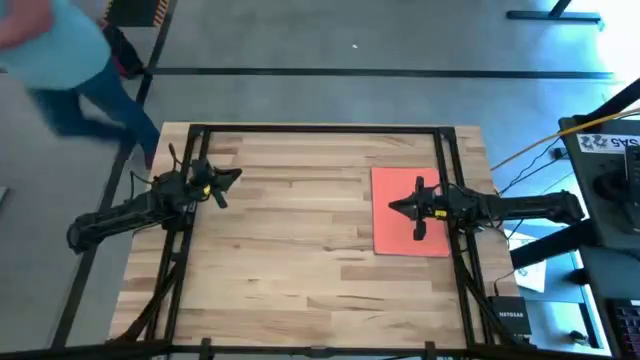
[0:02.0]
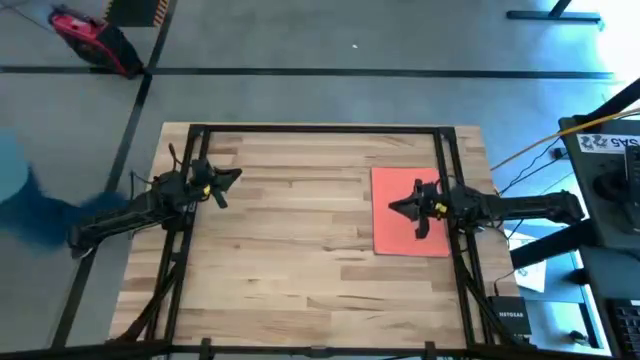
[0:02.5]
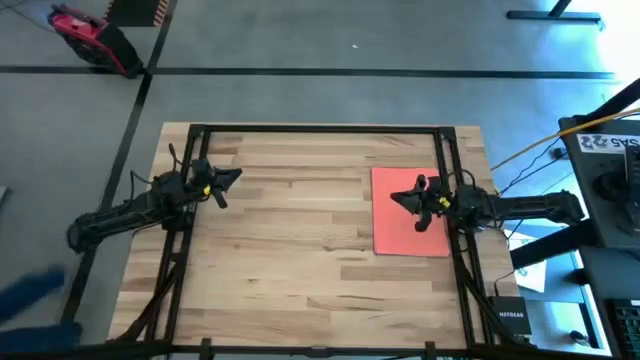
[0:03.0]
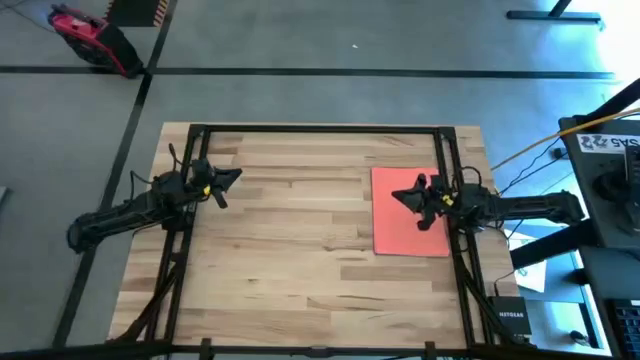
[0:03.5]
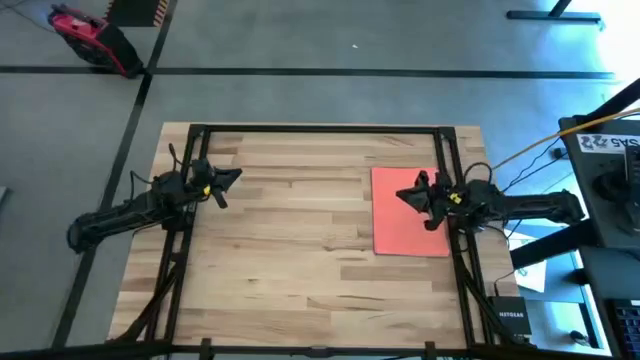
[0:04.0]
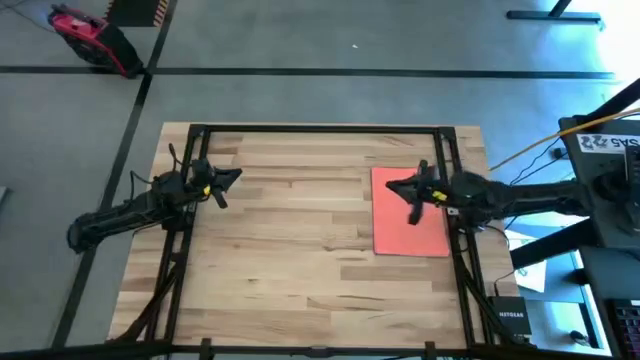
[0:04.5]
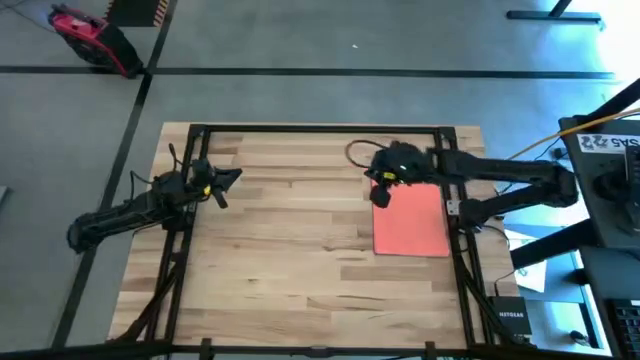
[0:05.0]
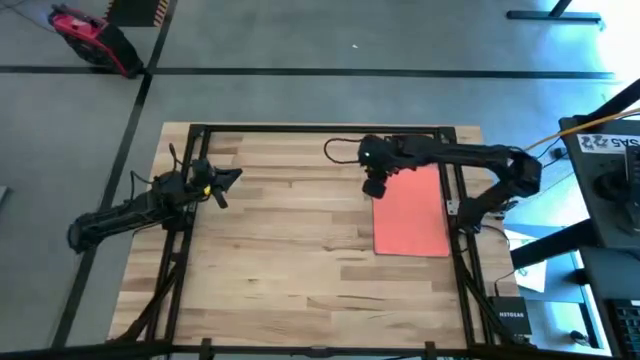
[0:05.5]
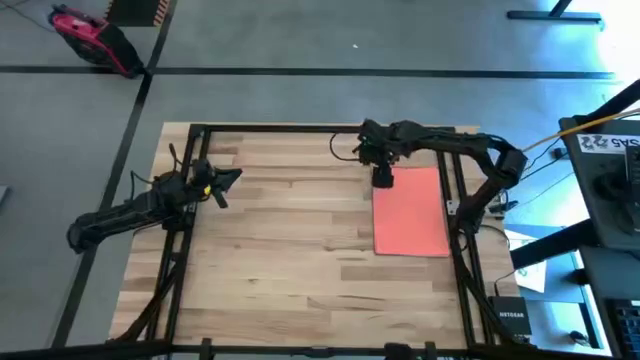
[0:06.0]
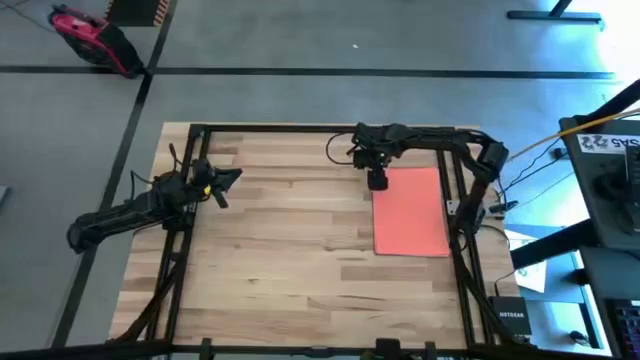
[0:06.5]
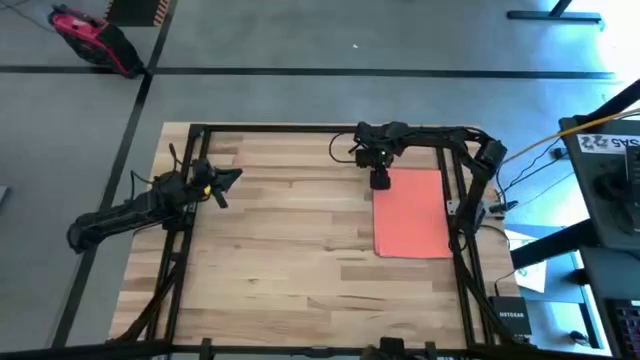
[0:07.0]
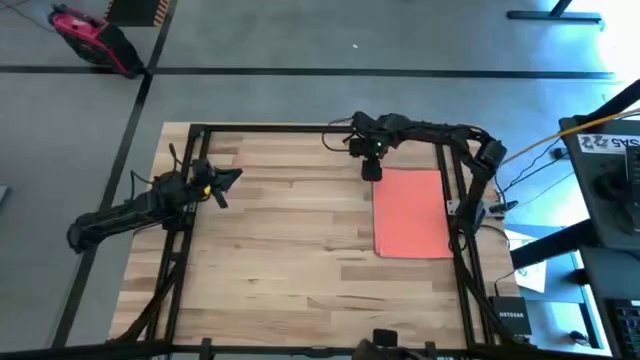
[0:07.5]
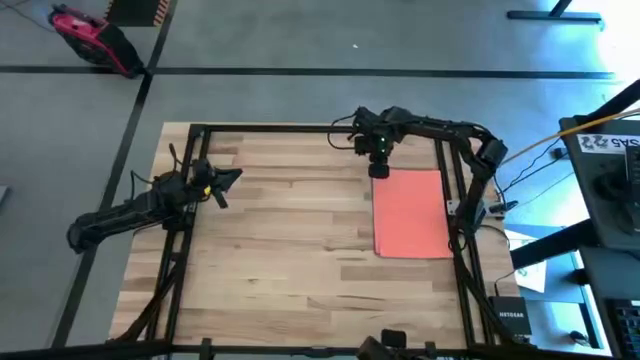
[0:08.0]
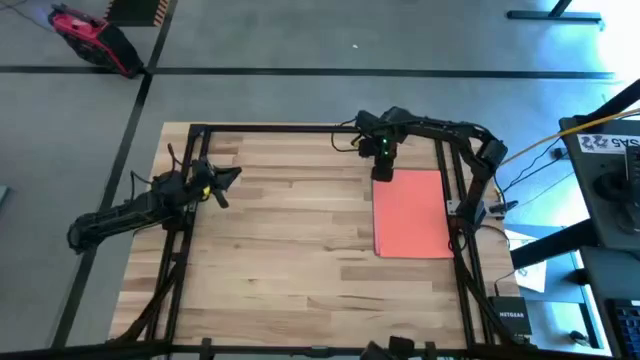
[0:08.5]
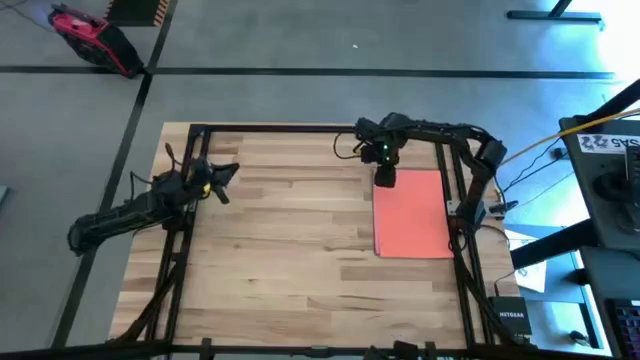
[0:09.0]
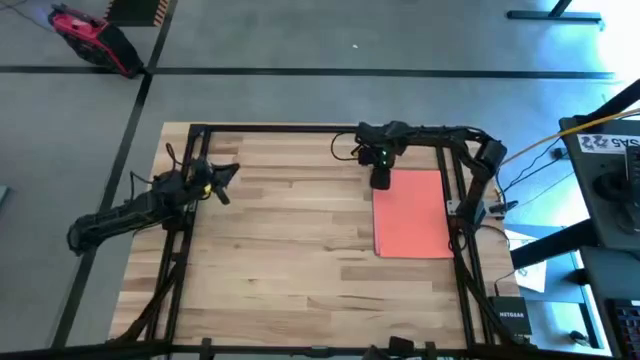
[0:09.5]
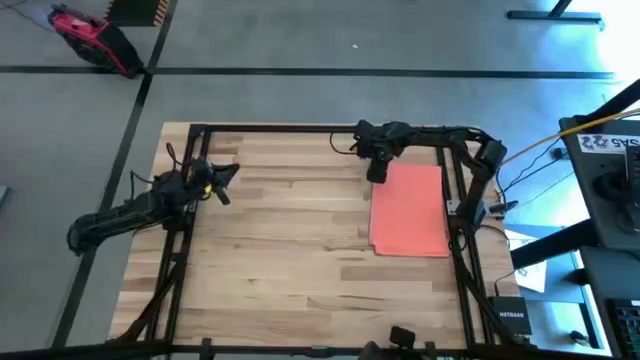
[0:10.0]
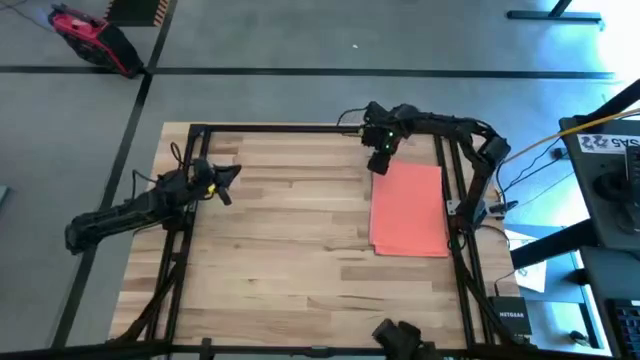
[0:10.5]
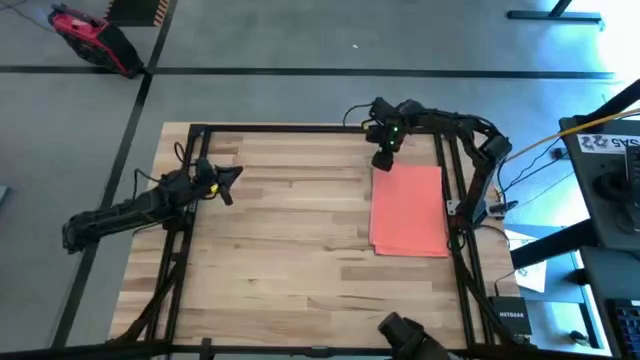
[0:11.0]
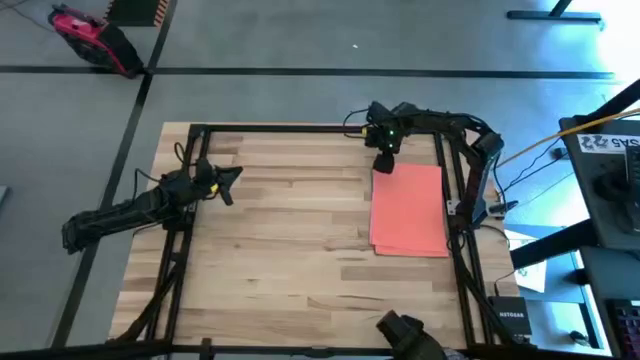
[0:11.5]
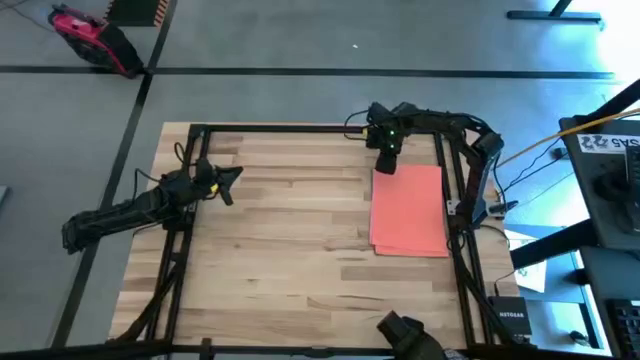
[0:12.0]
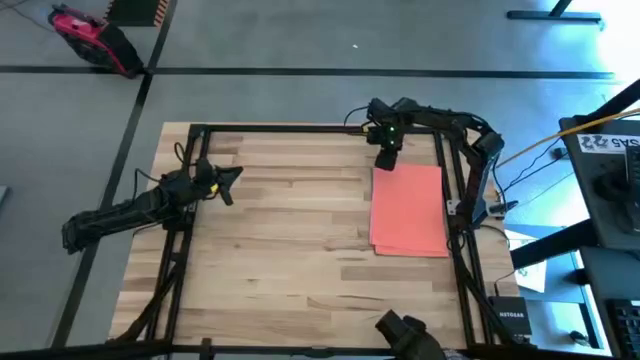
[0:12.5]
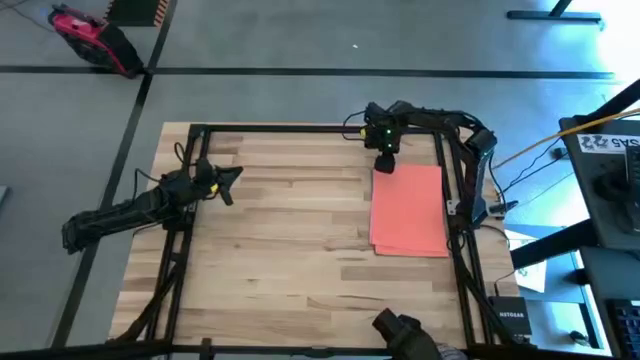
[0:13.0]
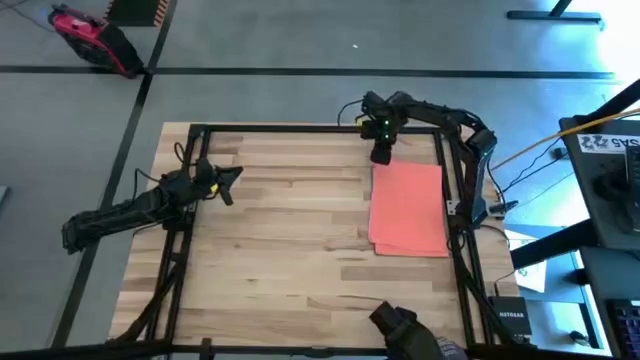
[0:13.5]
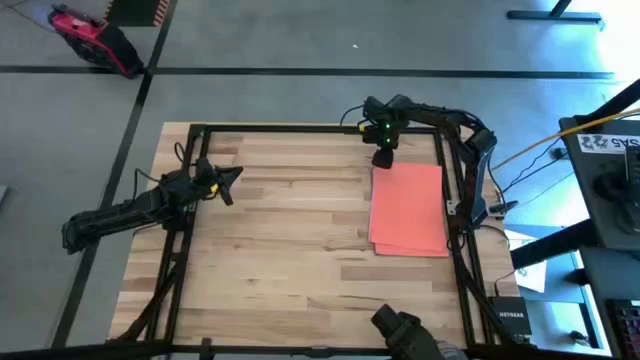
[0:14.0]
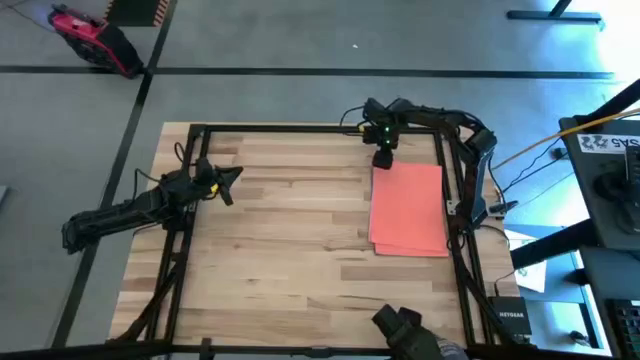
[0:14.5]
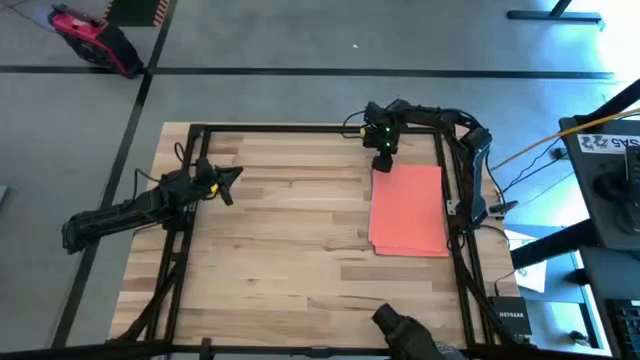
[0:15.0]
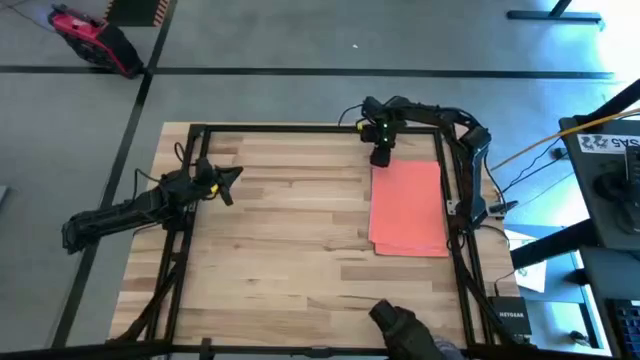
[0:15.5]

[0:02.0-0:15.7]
Task: Organize paper
Move the orange color paper to the top left of the table
